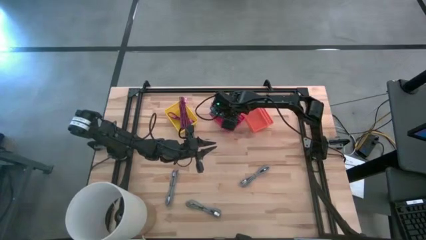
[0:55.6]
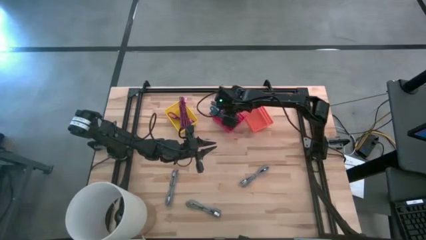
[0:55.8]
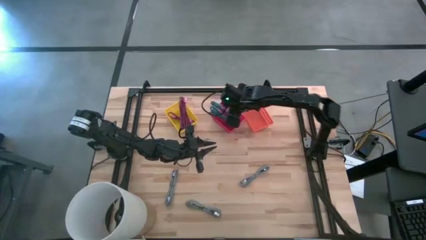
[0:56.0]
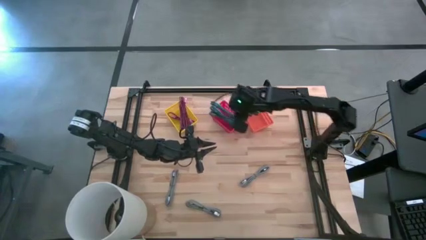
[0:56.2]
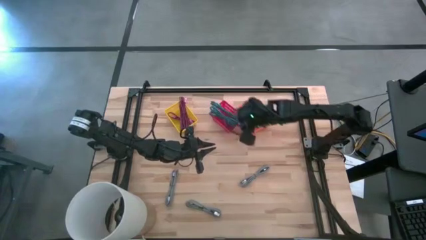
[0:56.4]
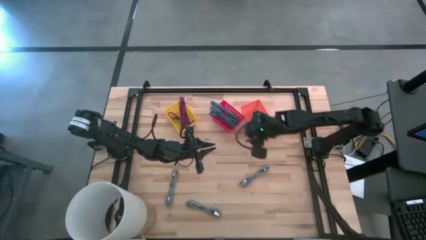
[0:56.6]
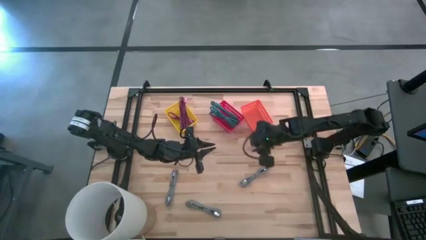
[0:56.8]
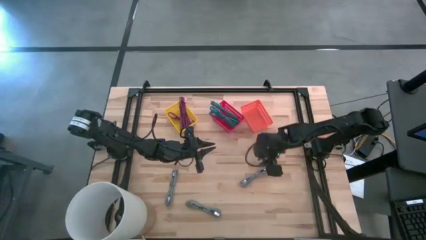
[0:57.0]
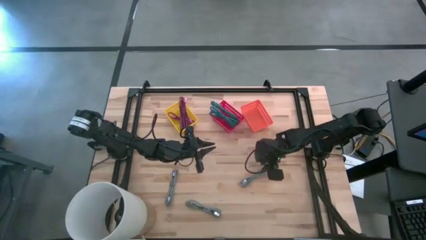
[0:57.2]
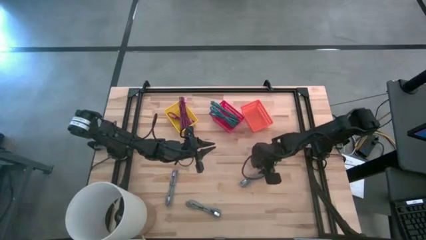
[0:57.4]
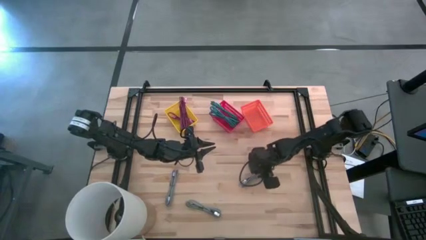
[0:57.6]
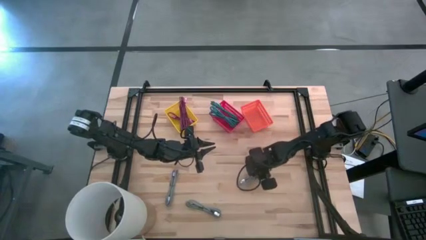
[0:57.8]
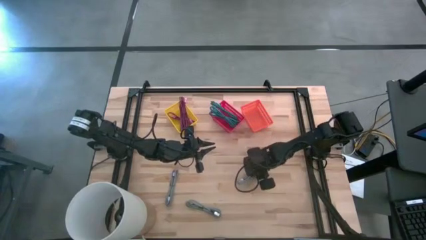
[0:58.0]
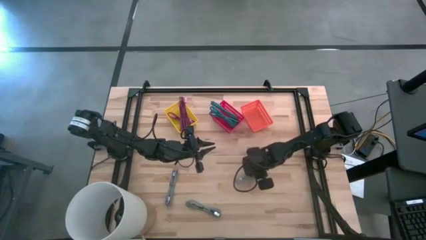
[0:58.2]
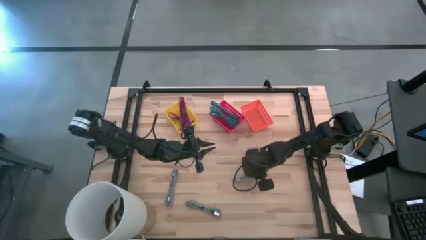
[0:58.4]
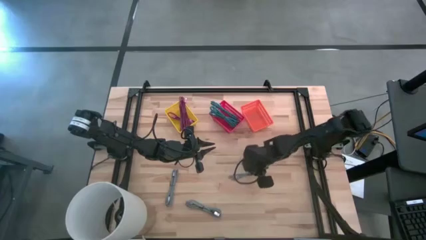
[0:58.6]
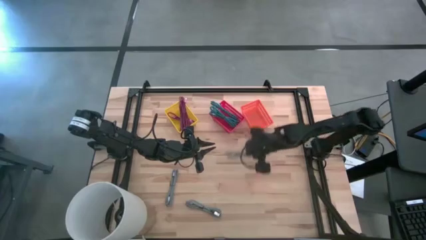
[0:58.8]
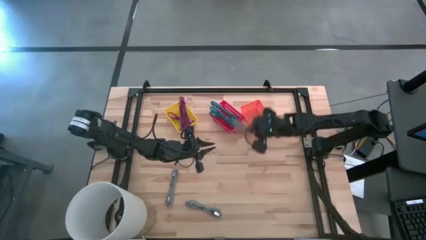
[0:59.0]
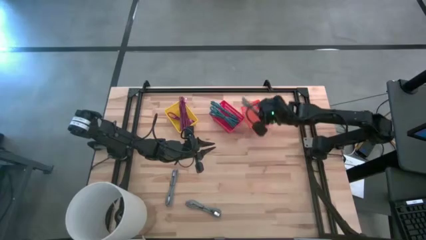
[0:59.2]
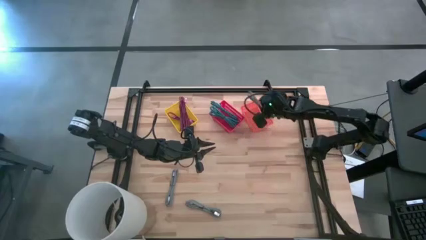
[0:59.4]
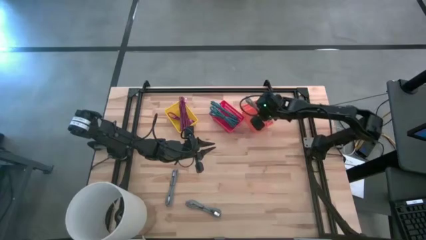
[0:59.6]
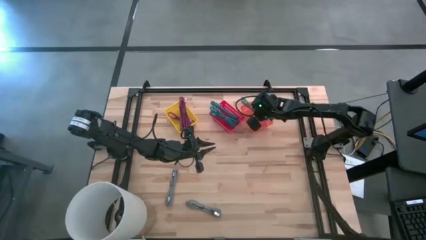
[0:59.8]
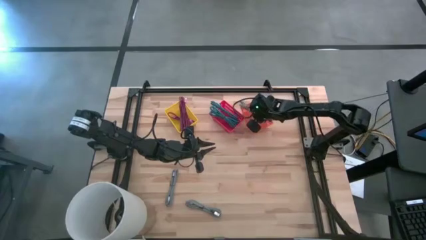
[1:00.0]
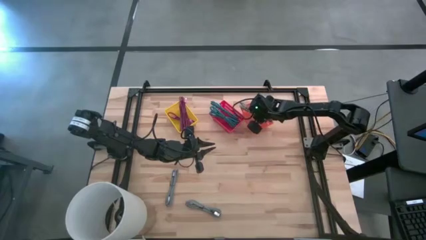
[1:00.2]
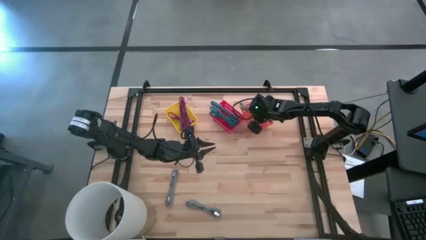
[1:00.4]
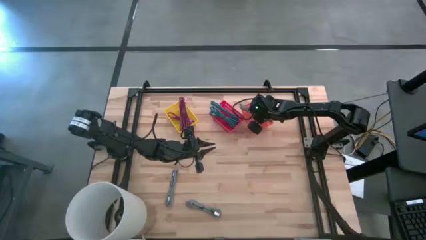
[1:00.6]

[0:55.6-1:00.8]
Task: Pick & Place USB Port
Put the top right black white USB cable into the orange bin

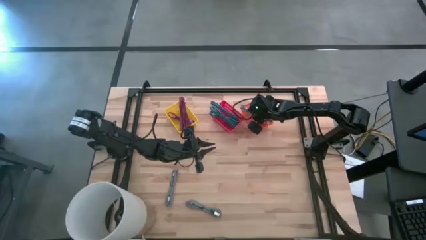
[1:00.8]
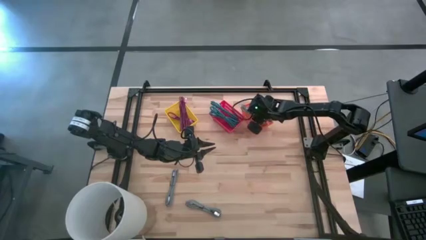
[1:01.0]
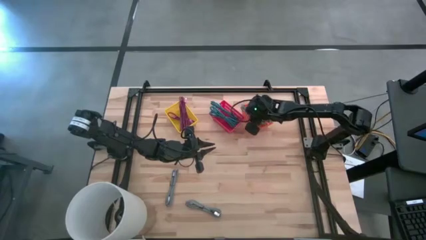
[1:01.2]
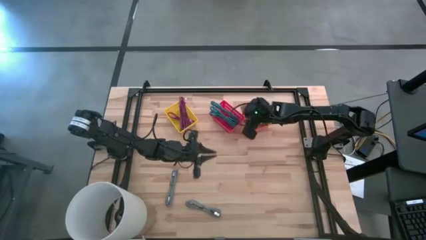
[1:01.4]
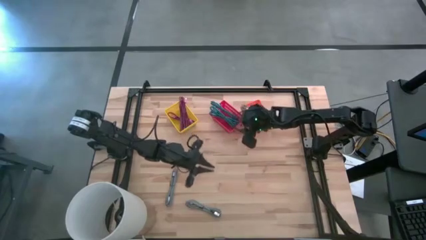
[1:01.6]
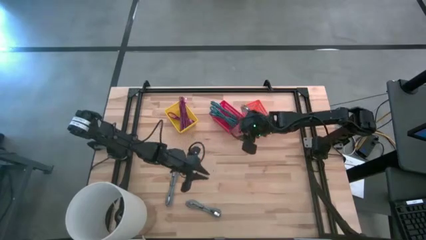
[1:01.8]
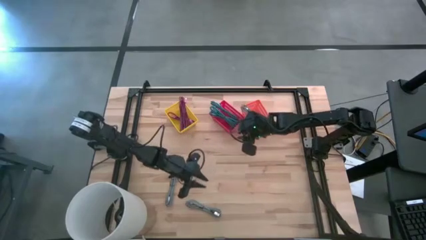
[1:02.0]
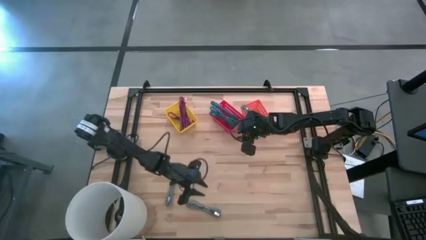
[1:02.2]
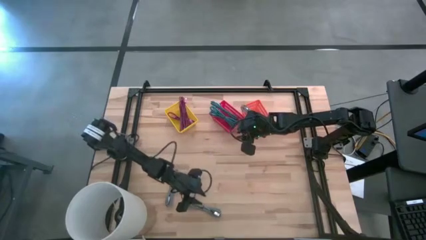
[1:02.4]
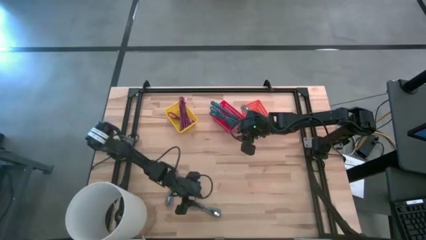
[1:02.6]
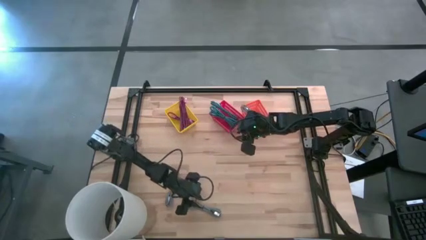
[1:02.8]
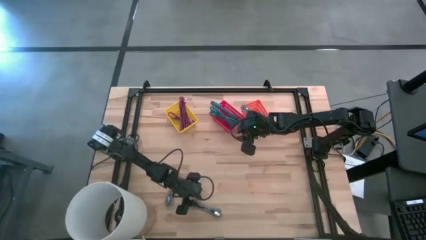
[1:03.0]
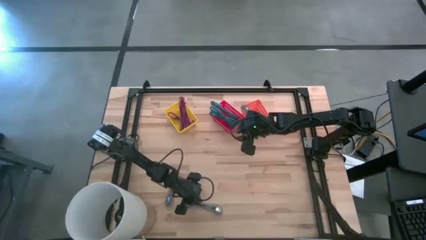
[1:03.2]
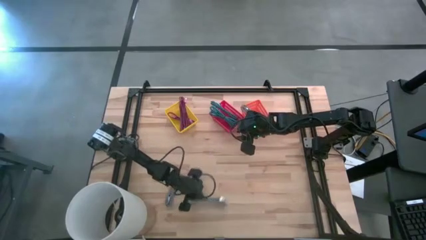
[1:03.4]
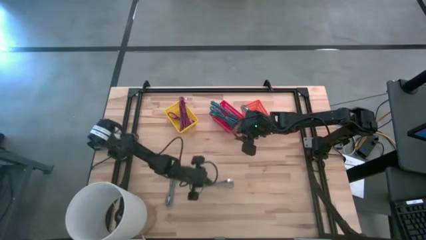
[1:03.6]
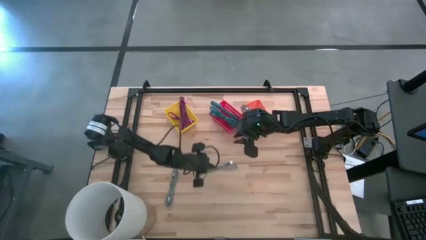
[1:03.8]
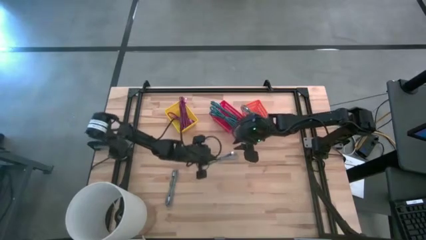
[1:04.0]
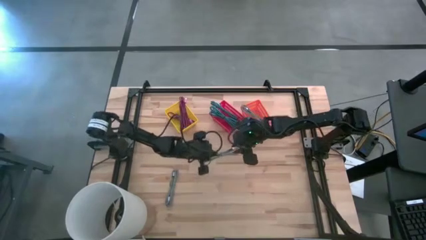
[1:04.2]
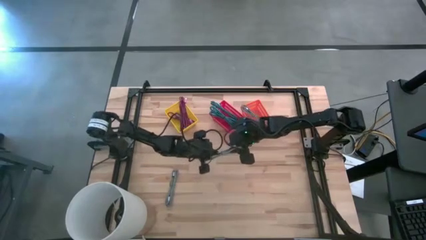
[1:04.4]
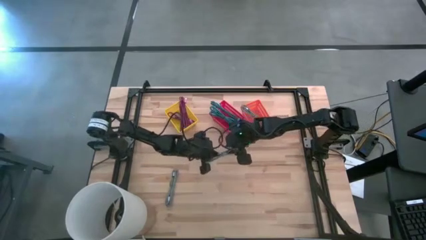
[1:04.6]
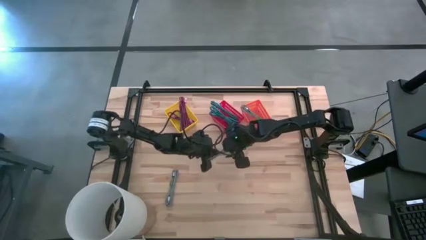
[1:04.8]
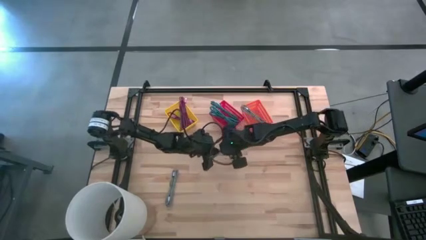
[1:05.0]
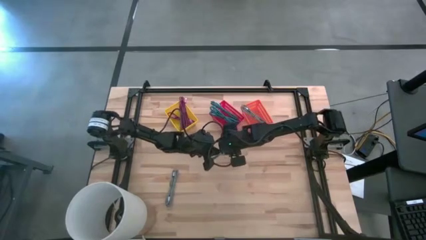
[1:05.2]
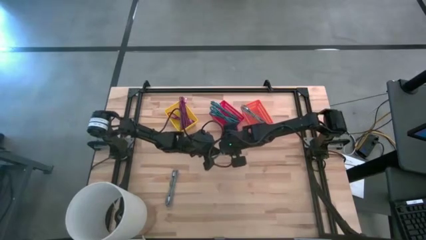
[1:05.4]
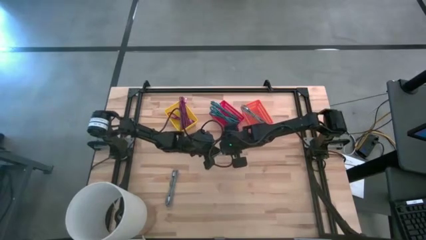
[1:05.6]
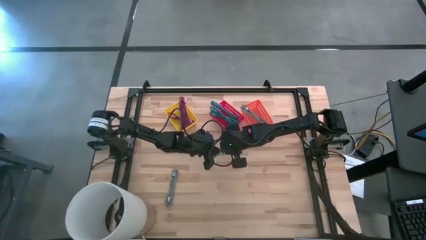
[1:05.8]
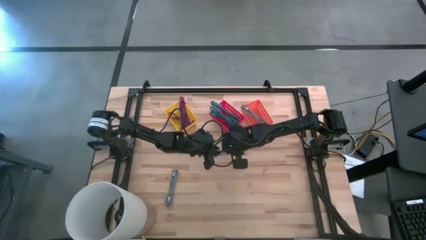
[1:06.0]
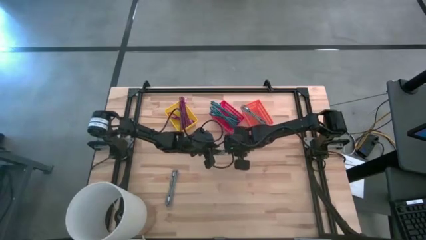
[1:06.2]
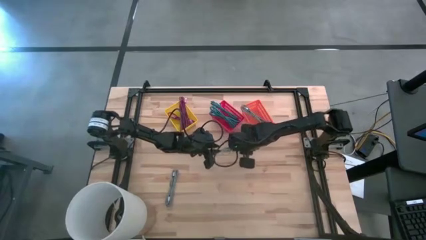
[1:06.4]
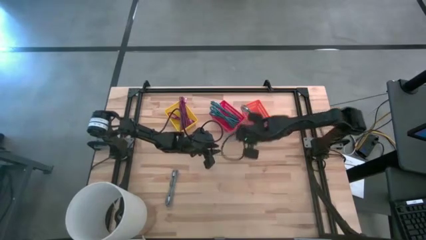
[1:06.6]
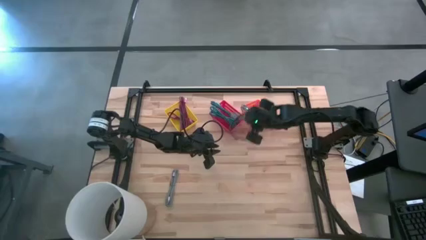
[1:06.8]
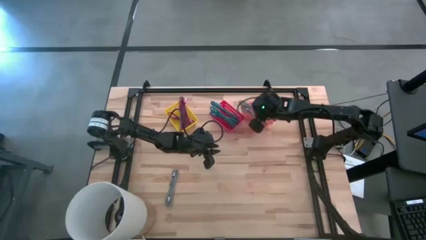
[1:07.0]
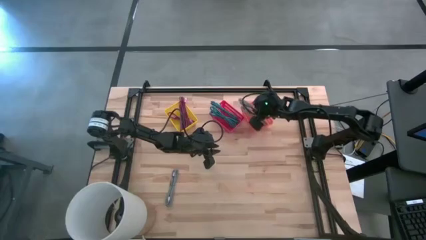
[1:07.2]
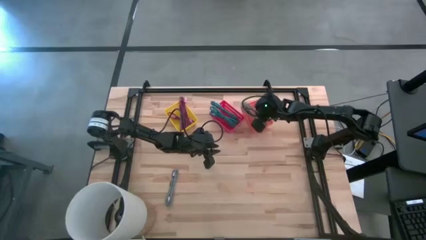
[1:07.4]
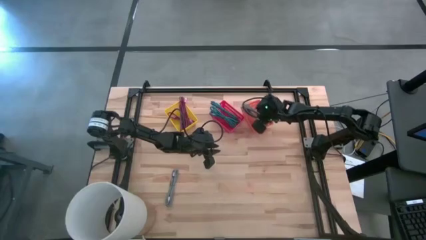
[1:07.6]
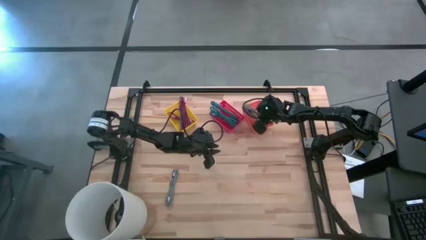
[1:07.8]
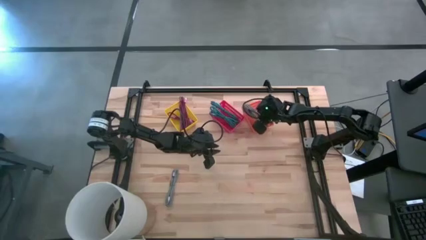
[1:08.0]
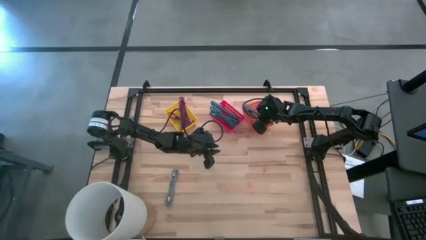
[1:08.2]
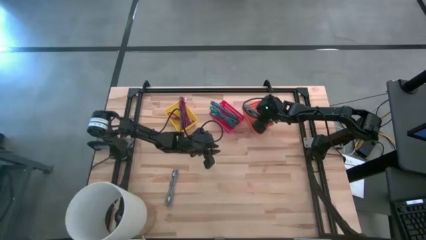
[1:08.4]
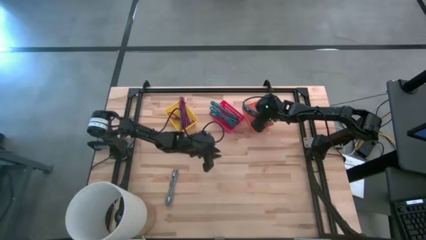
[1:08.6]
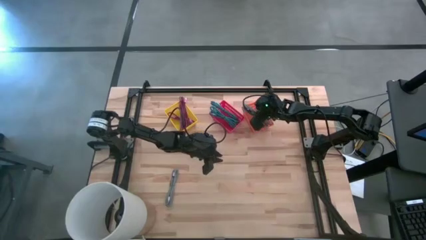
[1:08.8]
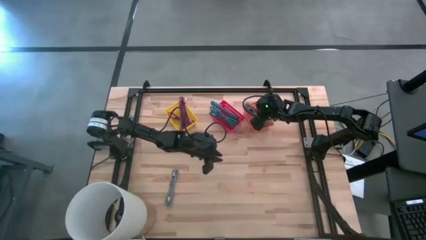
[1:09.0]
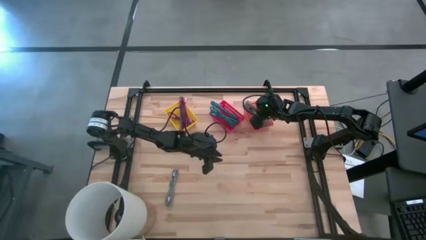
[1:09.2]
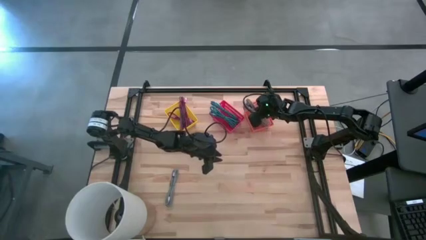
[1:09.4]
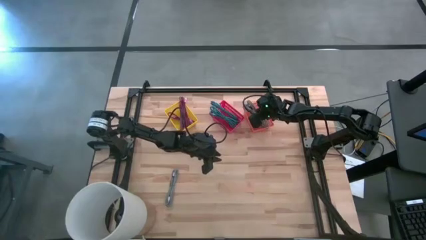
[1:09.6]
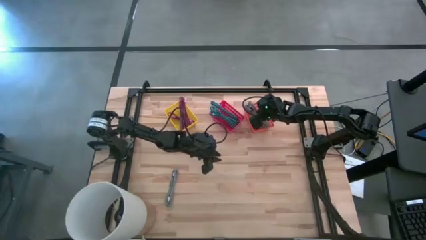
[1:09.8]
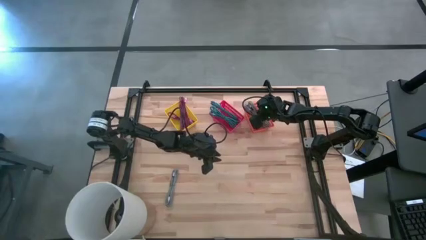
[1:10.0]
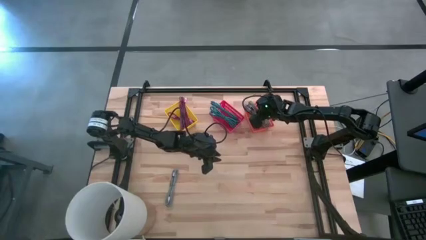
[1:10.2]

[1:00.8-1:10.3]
Put the bottom black white USB cable into the orange bin
